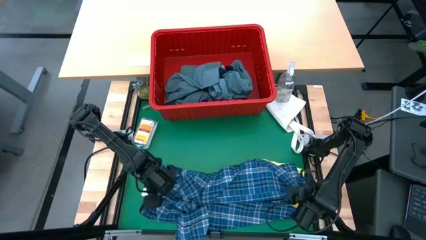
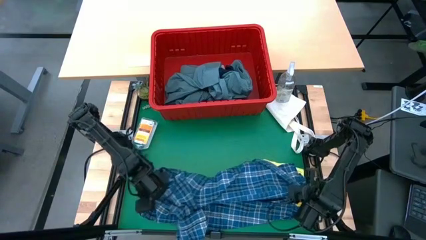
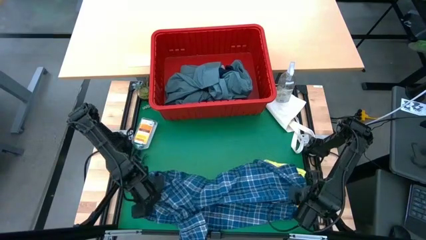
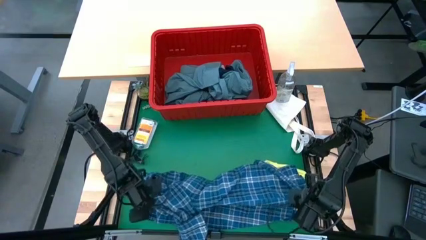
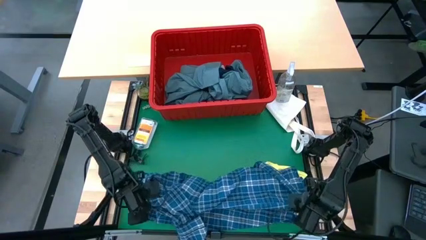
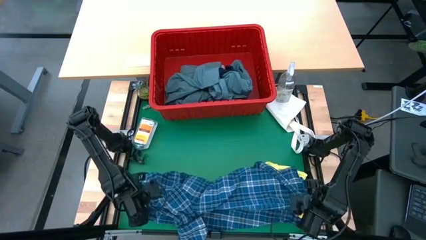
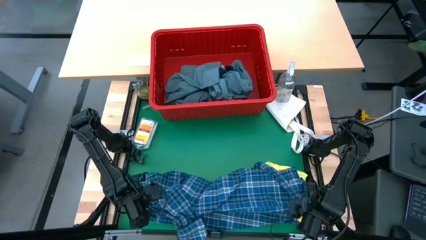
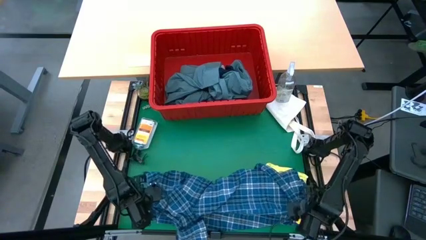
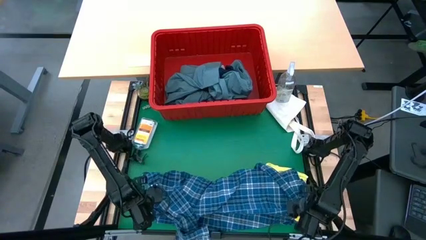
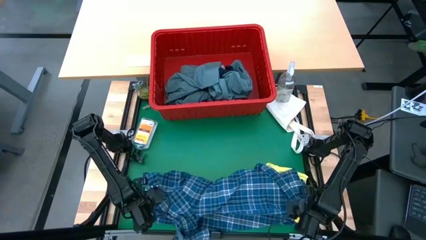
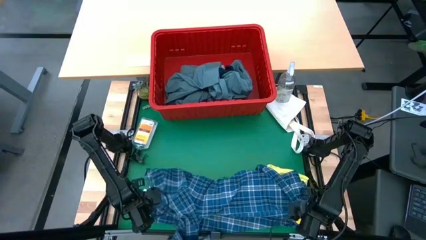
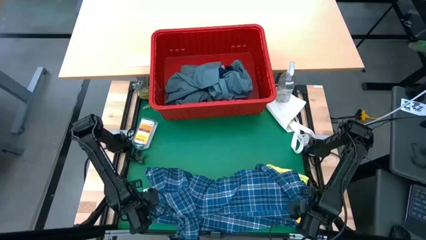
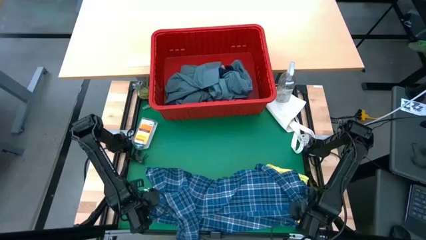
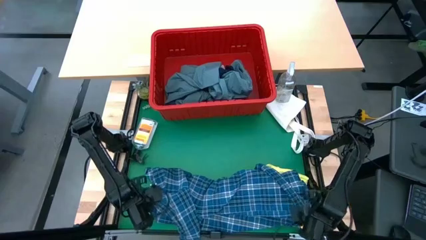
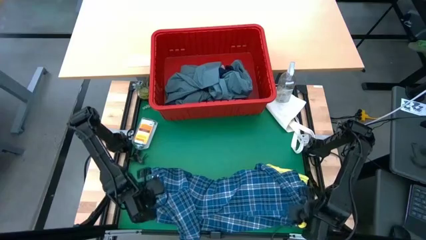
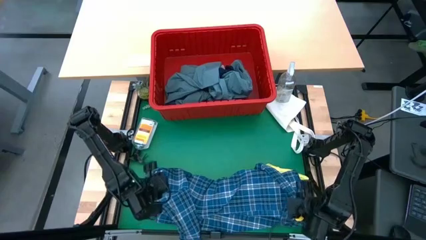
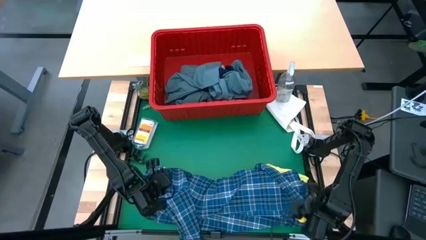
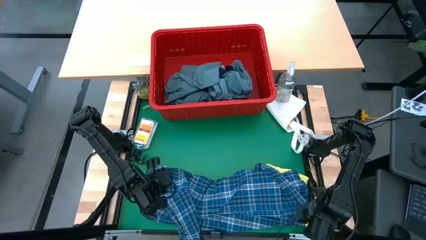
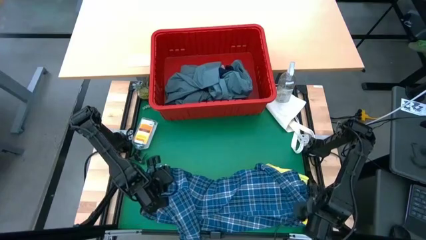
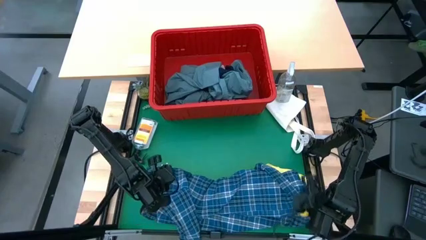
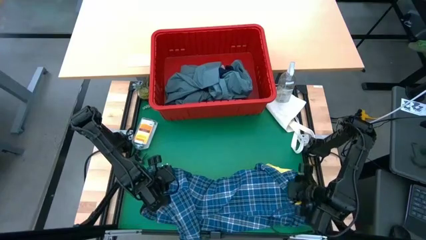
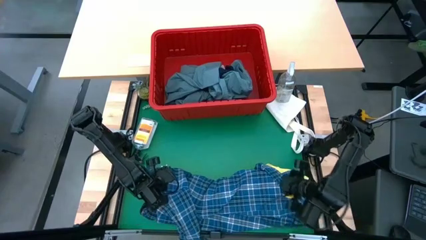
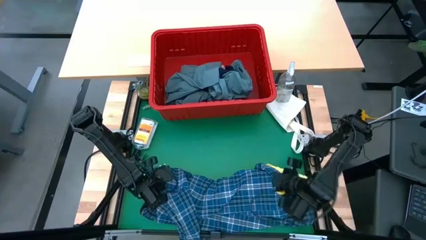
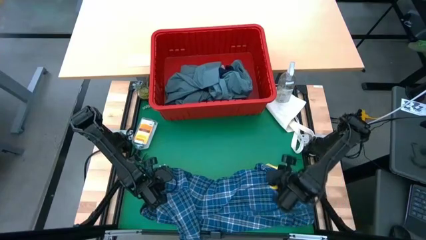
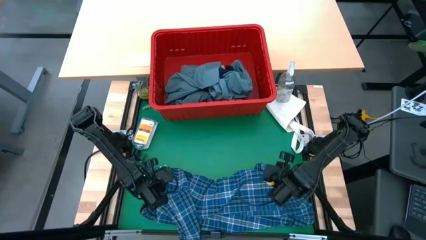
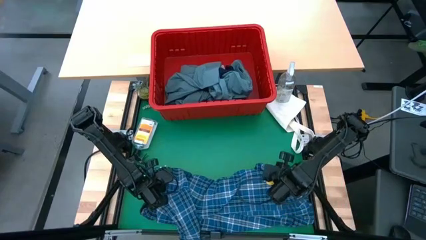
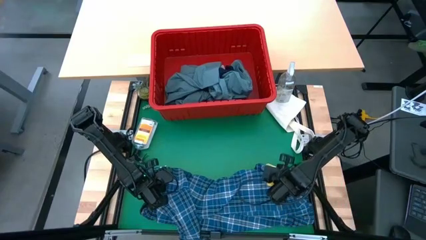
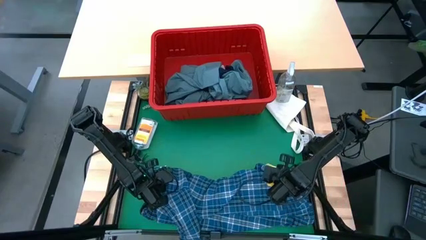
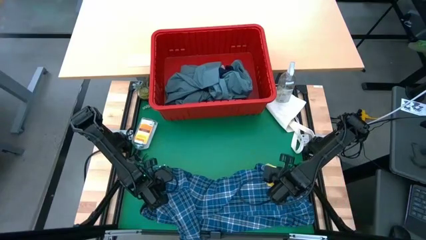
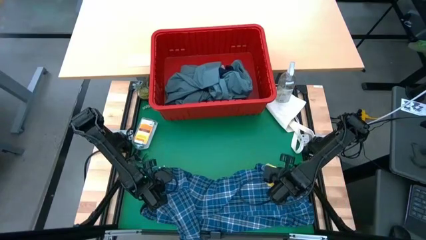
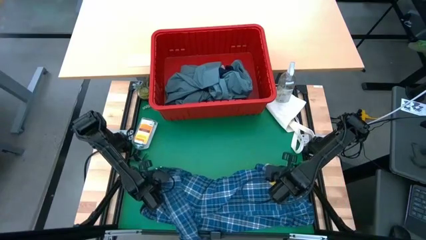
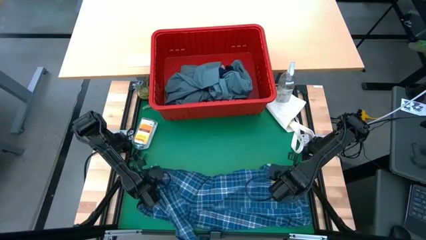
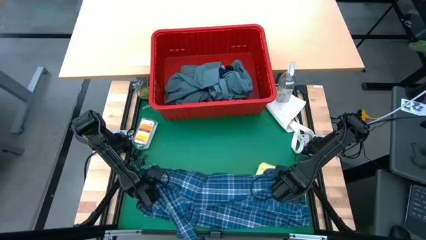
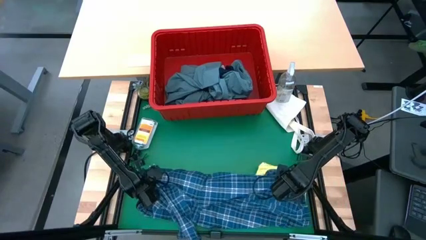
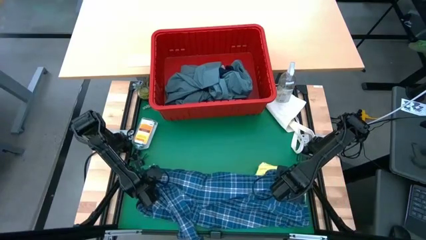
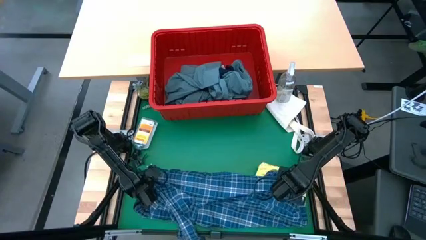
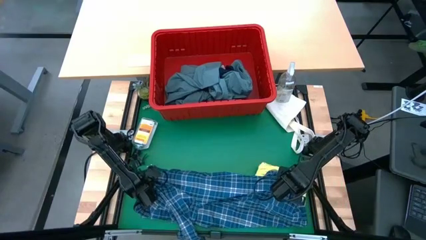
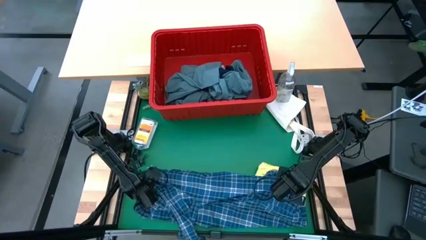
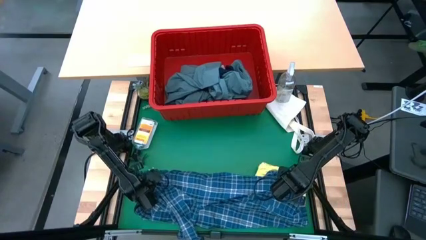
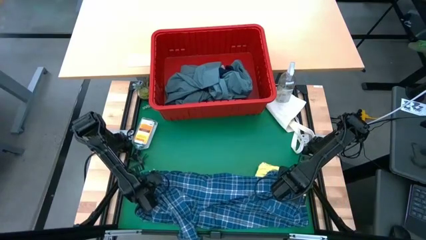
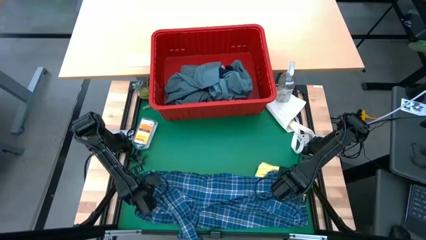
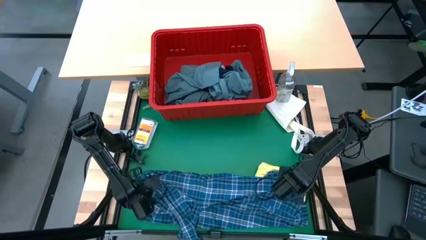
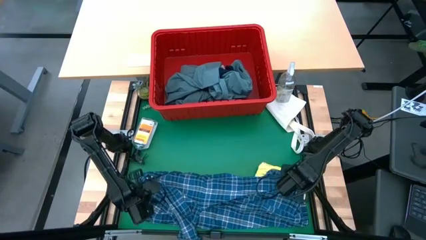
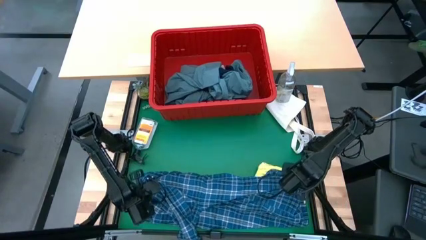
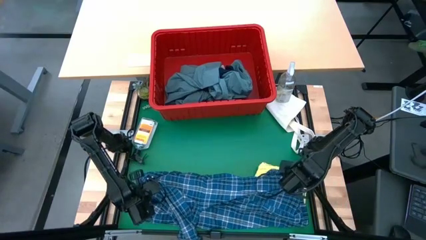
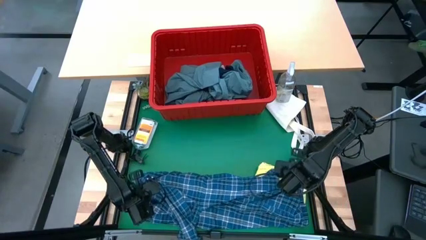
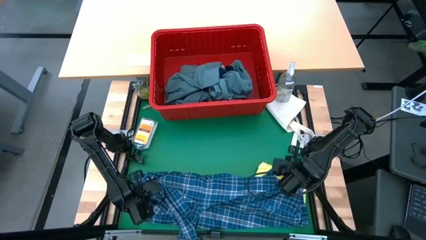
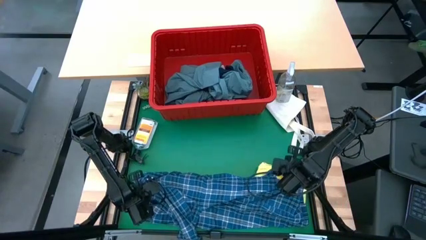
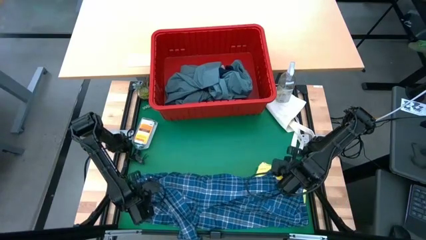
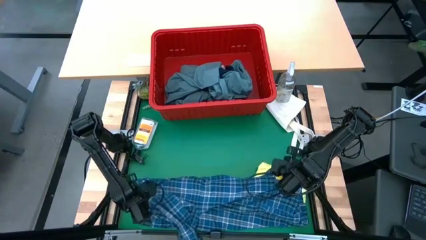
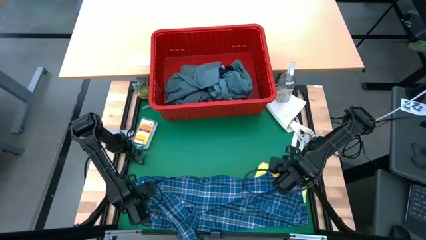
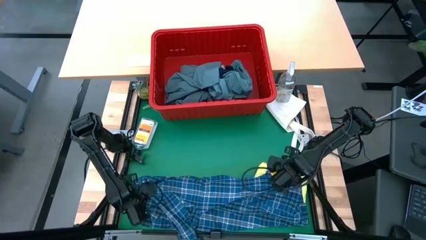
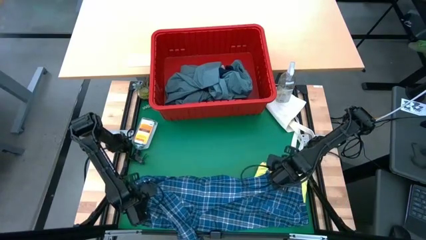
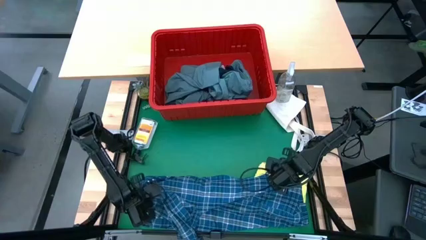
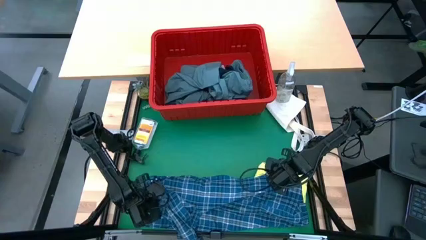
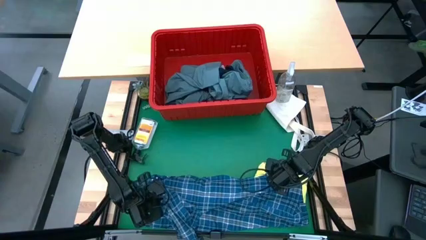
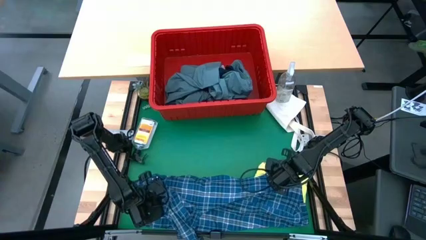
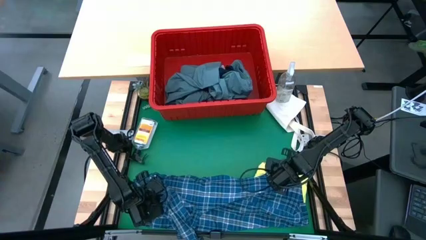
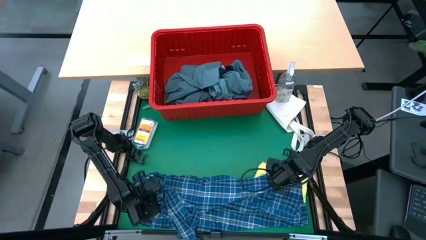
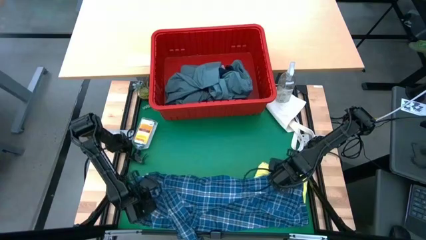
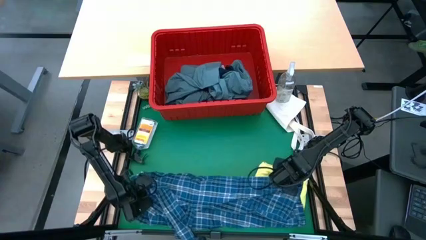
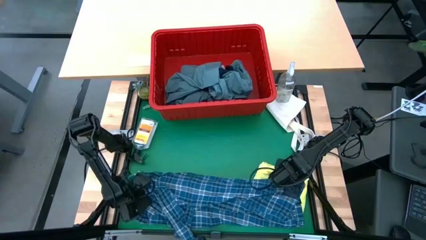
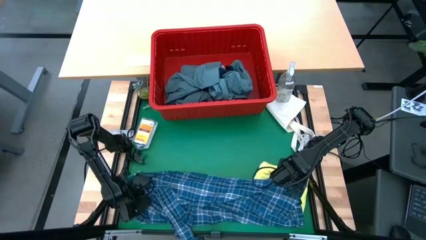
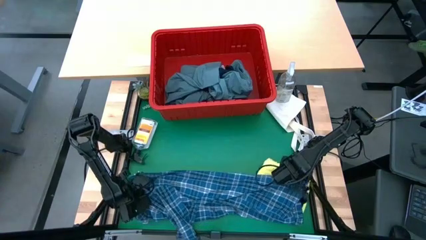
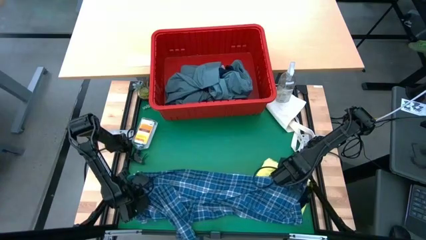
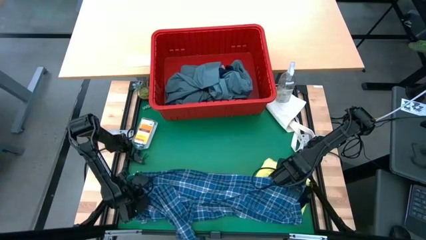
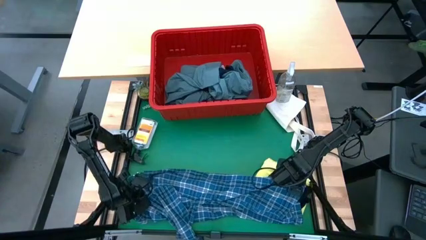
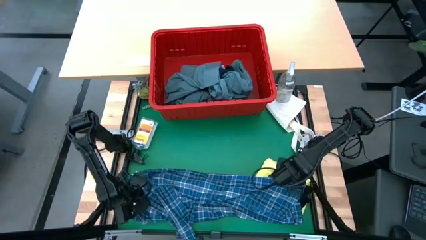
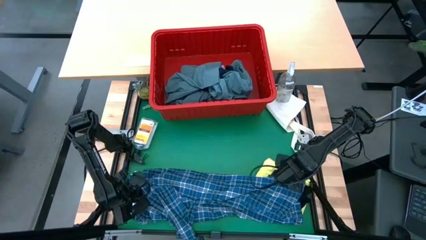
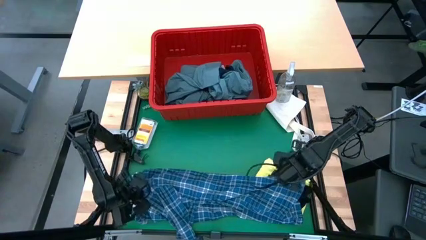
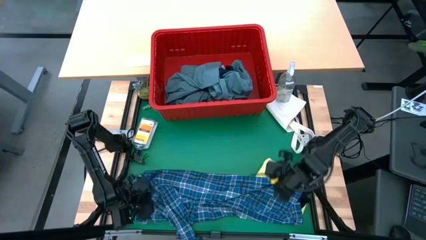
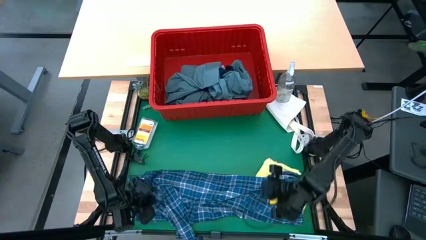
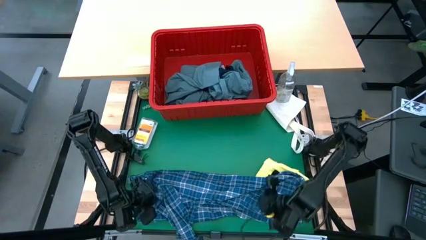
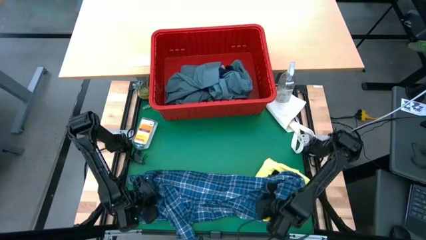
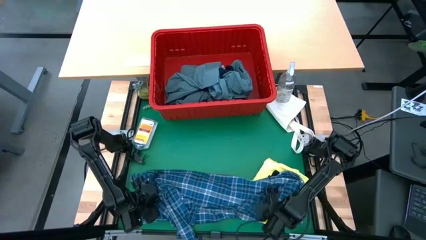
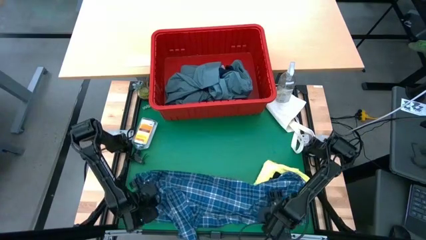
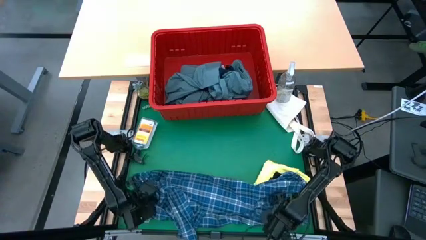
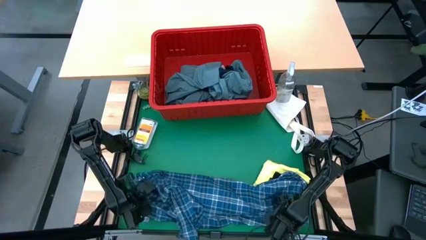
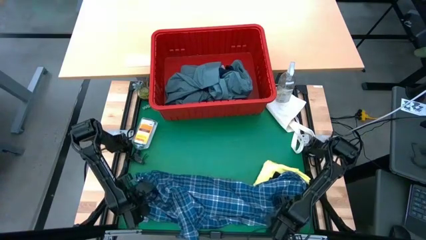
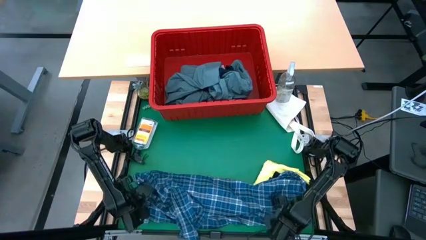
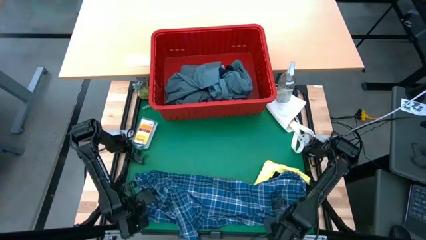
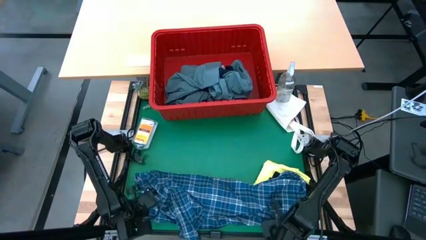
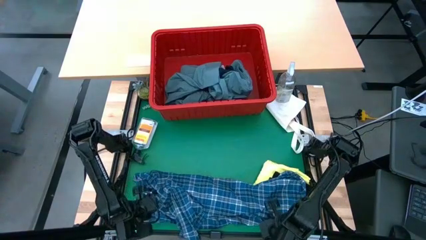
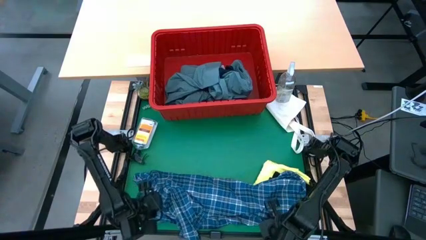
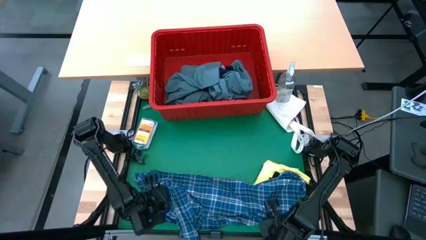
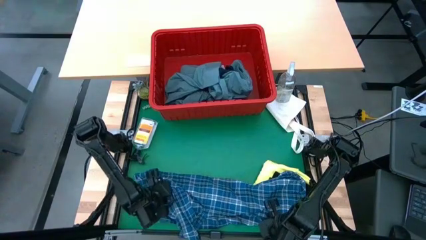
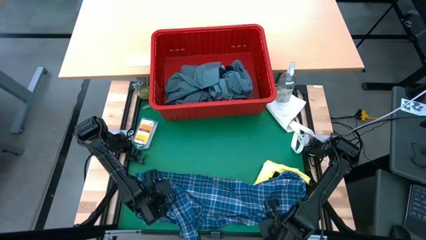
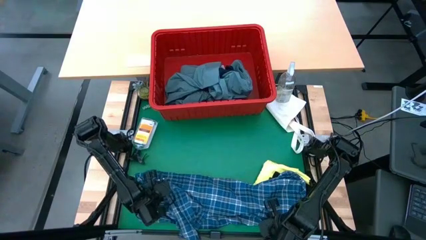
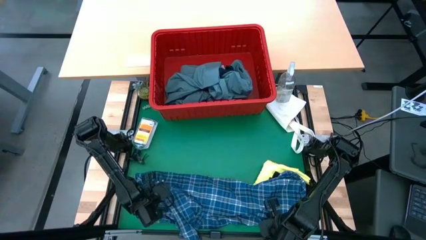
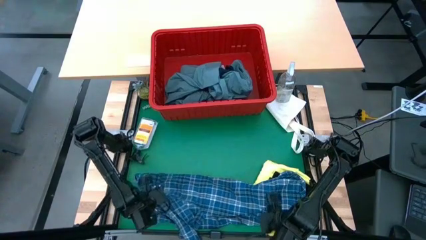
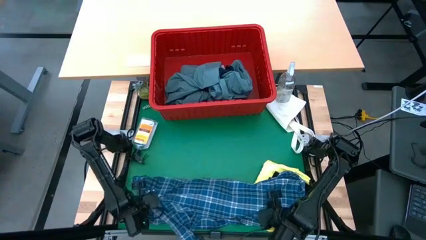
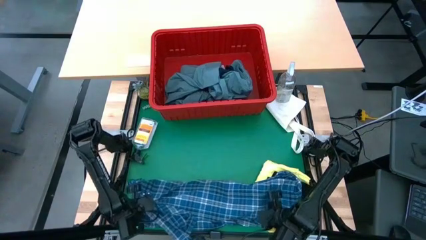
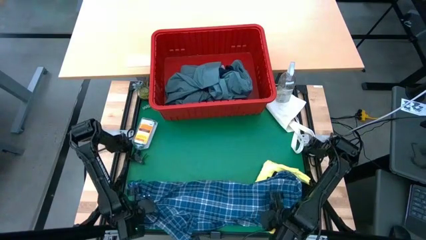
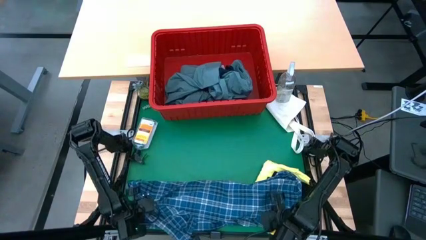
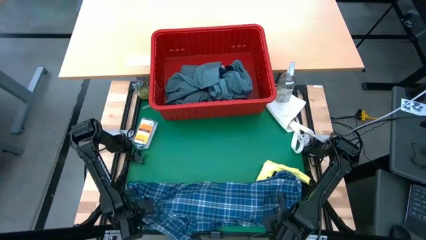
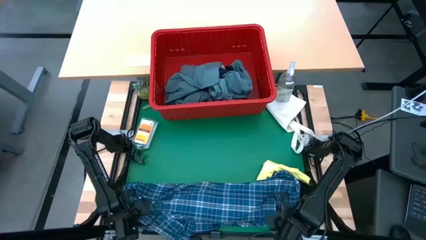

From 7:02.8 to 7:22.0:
Task: Fold Laundry from Bin
Fold the blue shirt
